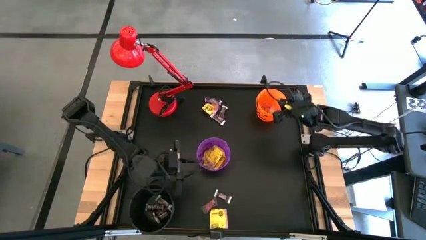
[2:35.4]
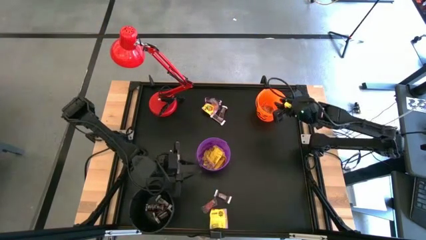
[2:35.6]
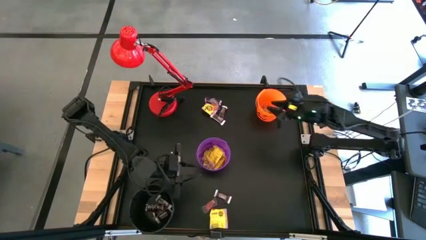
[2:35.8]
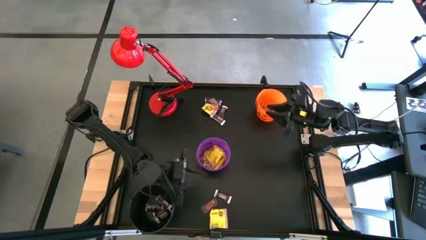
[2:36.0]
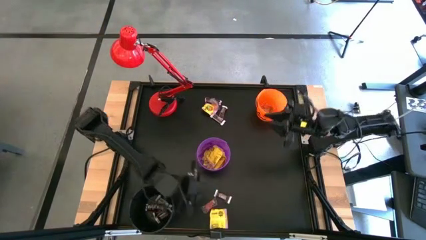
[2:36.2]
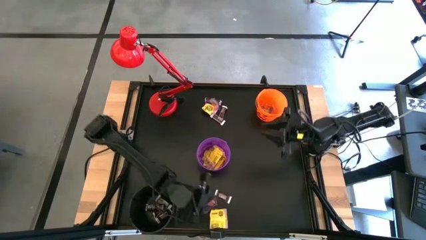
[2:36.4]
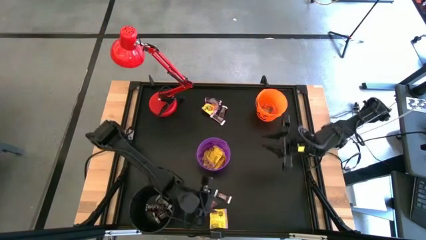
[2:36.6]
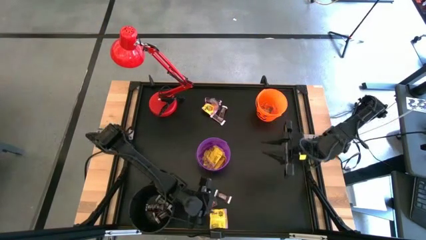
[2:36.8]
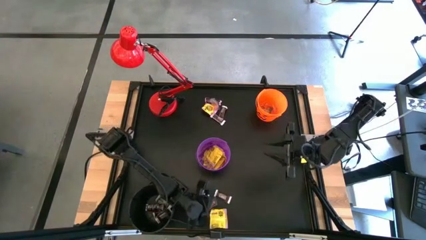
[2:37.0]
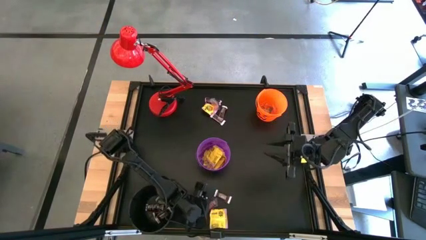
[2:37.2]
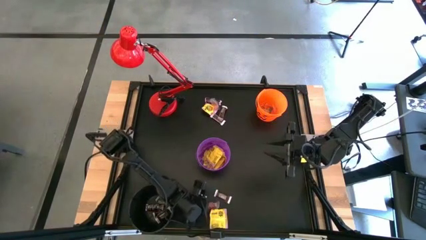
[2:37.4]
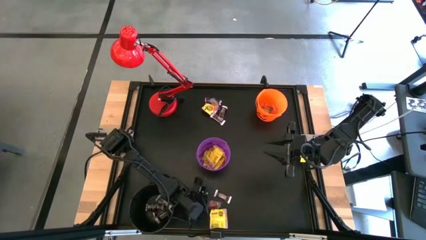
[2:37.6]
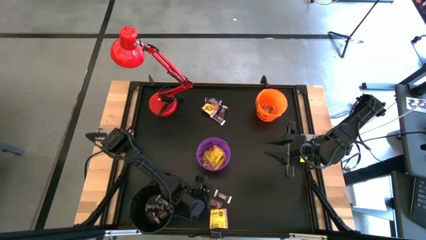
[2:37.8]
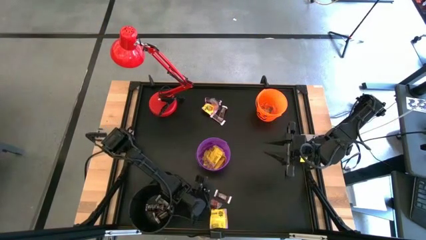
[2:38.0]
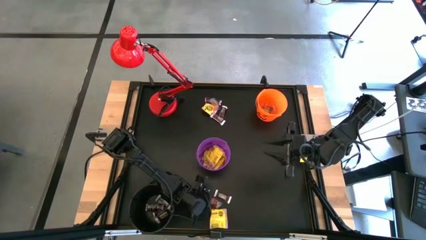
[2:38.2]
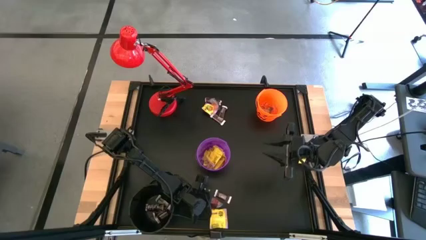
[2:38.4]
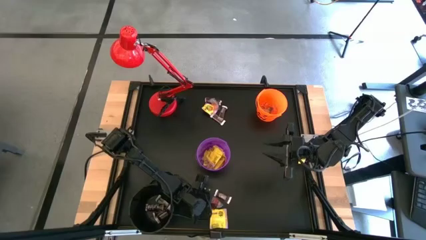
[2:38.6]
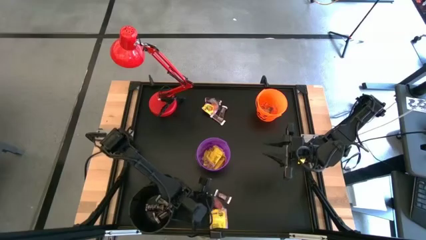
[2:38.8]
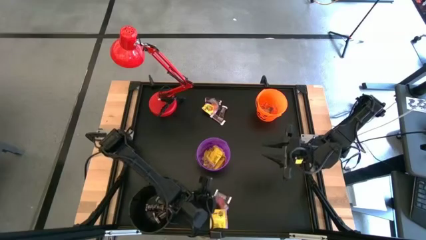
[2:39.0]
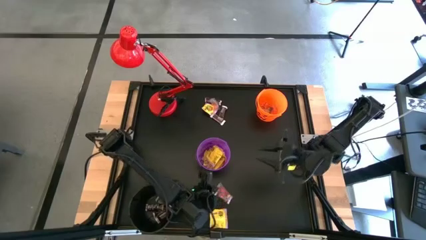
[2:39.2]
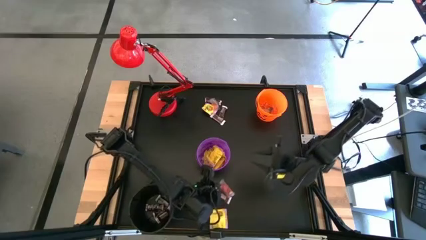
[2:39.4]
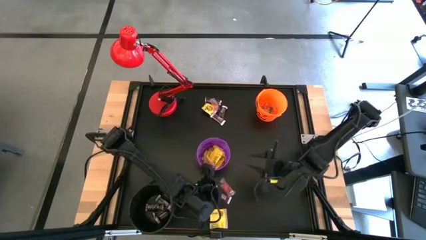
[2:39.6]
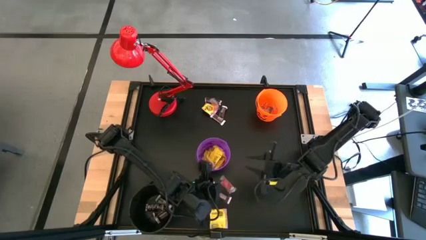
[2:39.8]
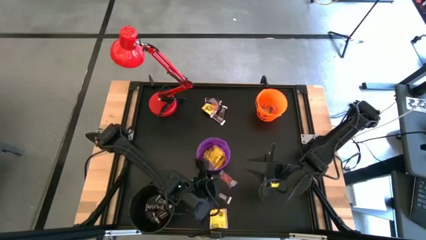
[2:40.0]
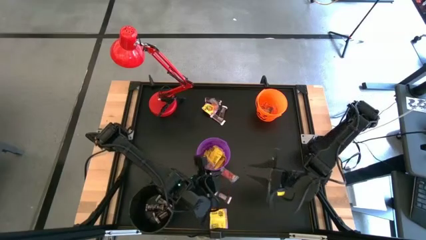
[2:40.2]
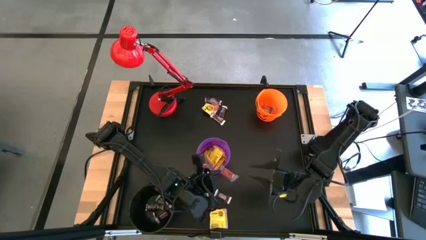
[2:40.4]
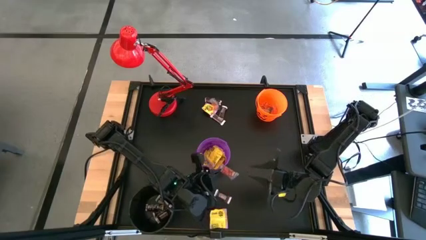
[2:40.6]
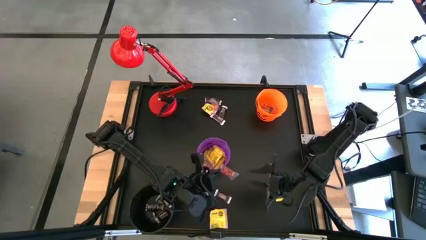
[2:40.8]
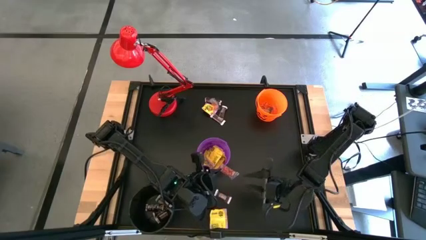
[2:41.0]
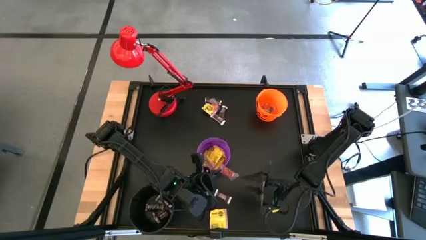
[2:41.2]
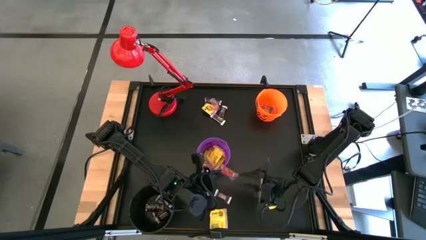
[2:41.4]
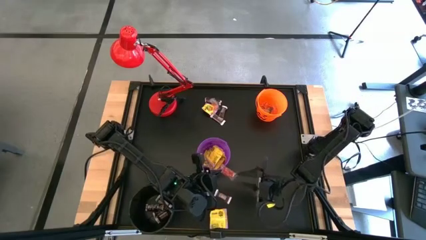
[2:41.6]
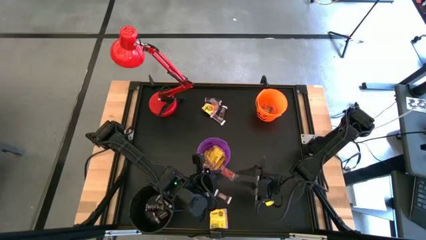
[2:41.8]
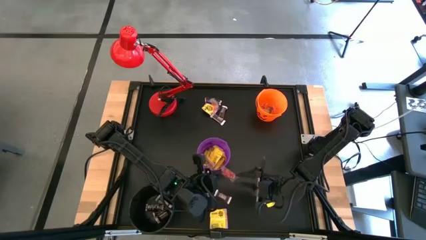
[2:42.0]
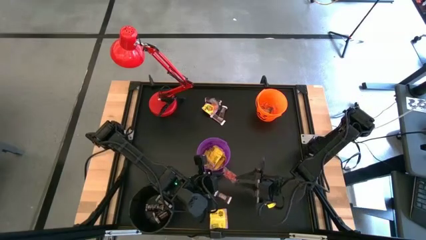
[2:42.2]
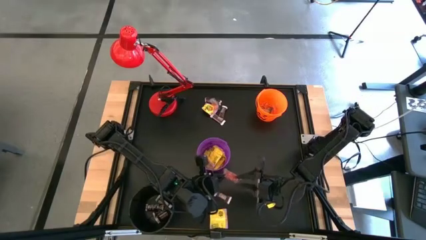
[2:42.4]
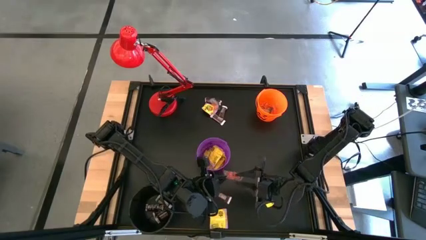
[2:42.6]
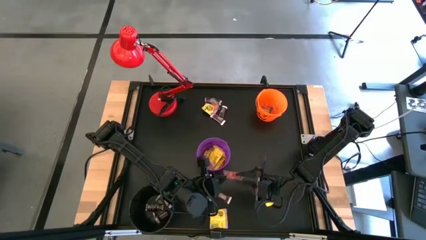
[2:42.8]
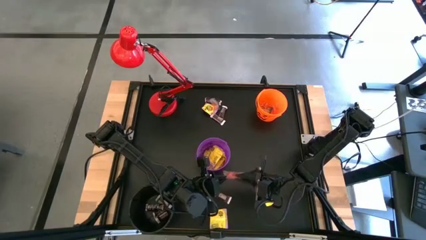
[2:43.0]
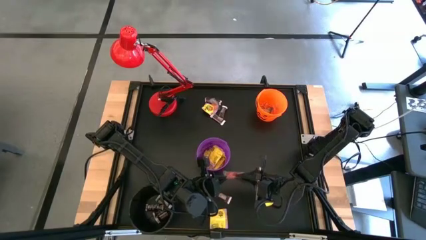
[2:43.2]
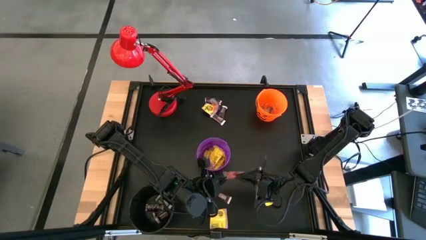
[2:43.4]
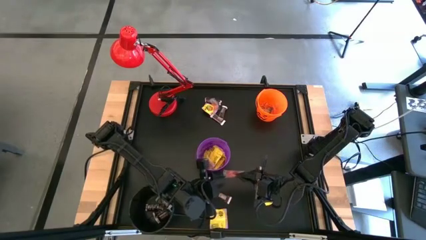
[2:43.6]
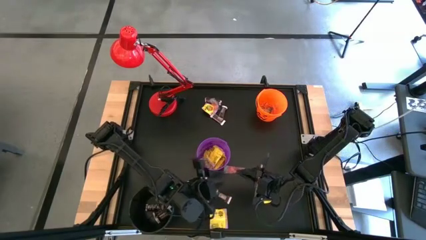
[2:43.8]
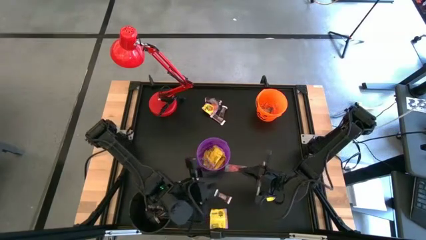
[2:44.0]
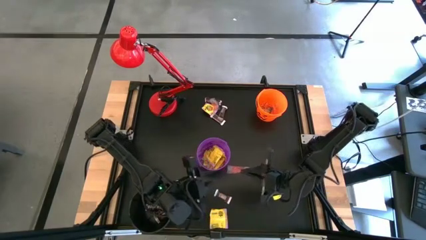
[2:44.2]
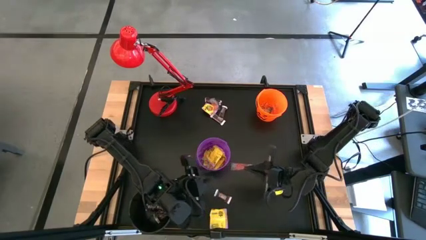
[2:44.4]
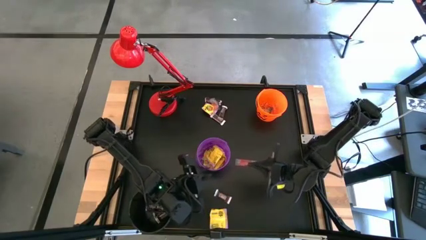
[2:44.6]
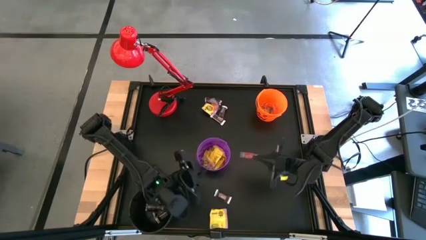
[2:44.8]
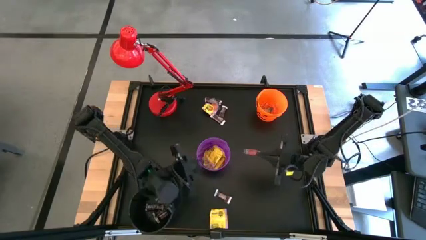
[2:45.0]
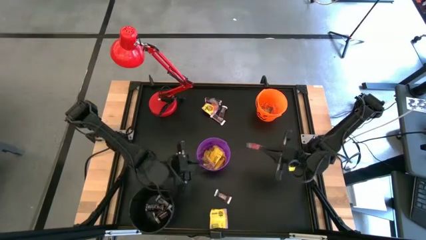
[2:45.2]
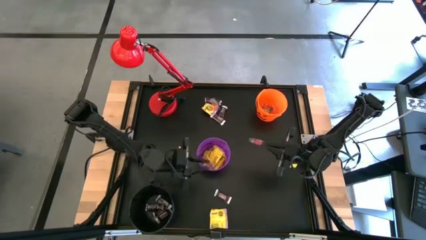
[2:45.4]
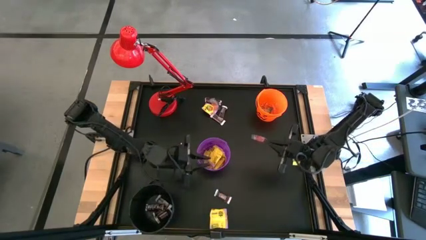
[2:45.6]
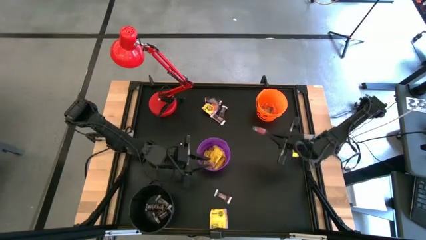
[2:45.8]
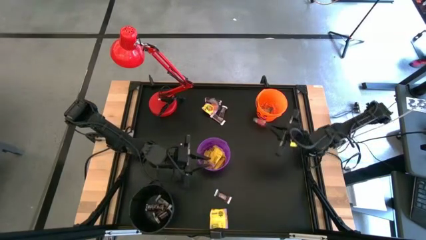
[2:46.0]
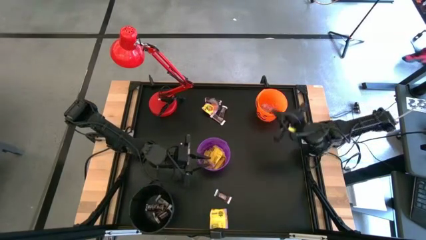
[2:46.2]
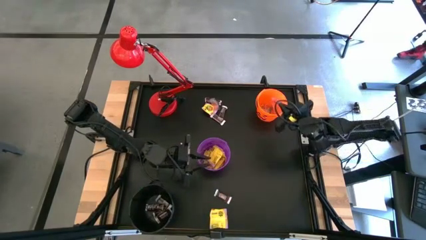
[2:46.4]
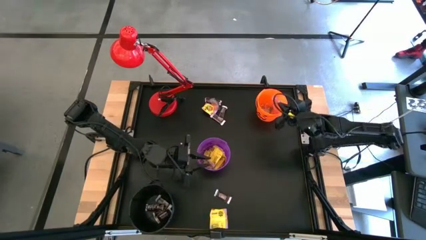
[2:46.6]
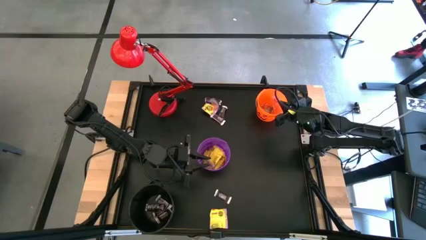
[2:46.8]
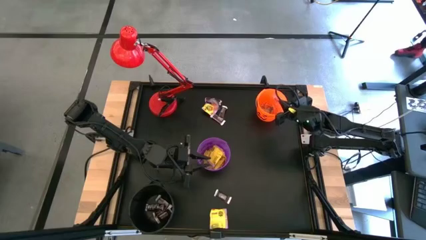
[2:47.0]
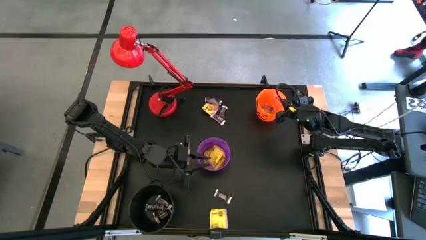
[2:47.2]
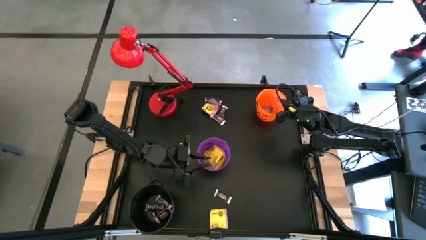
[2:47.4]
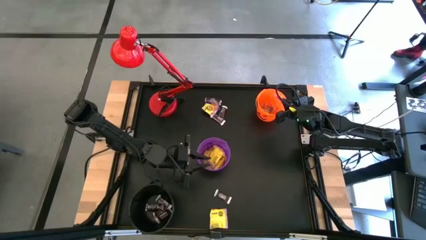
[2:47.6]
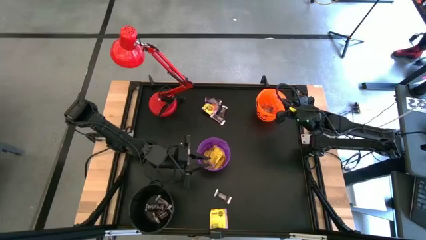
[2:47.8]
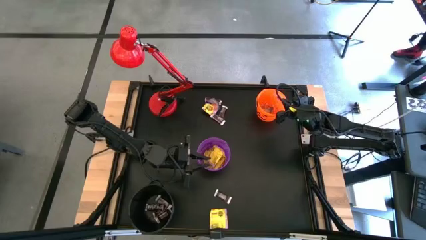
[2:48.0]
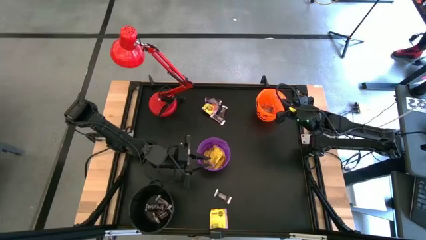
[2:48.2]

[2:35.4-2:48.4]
Task: Sort candy
Put the red gummy into the orange bucket

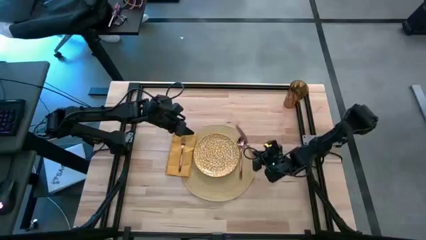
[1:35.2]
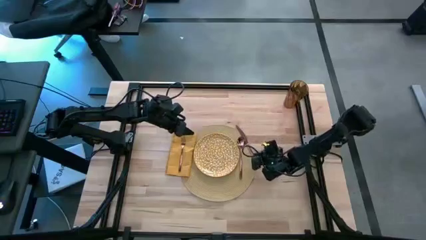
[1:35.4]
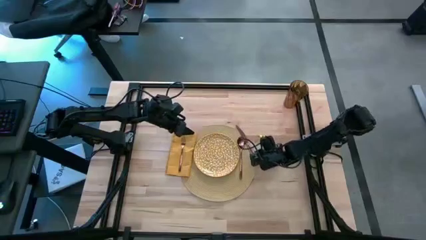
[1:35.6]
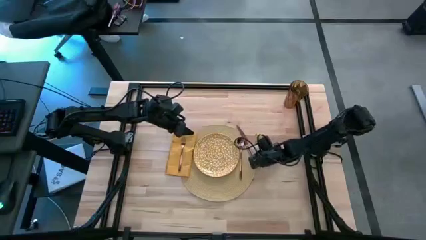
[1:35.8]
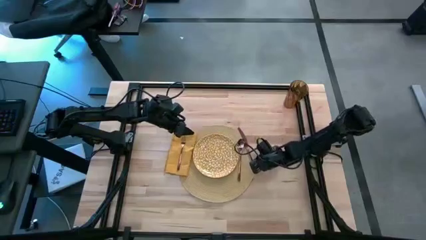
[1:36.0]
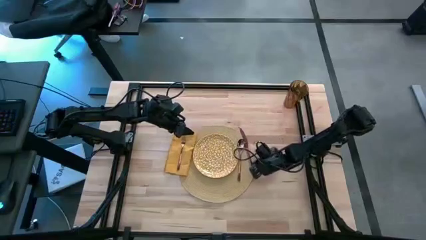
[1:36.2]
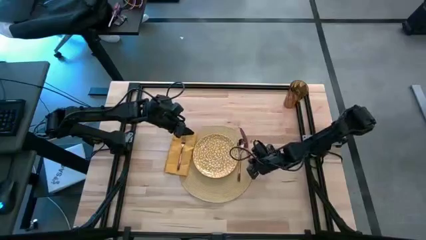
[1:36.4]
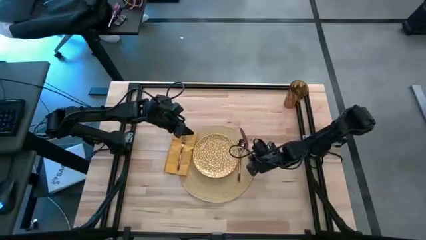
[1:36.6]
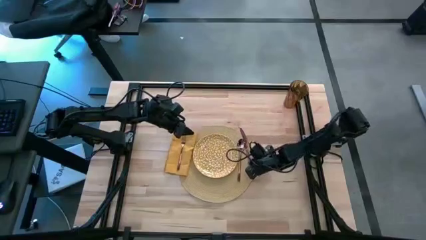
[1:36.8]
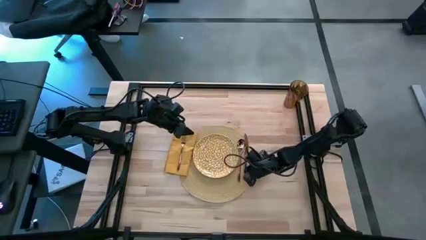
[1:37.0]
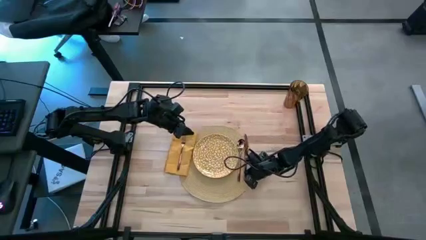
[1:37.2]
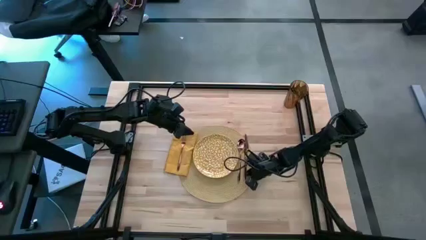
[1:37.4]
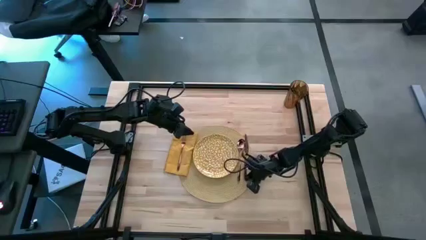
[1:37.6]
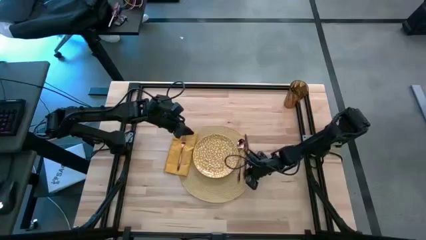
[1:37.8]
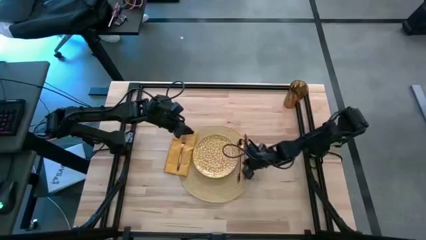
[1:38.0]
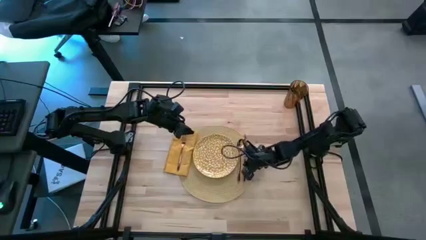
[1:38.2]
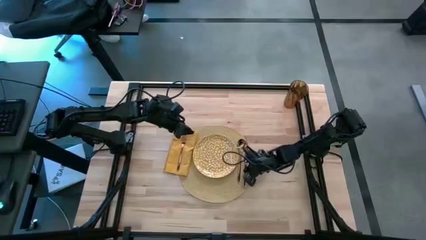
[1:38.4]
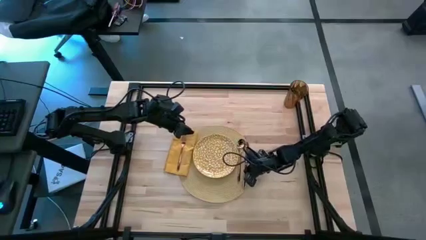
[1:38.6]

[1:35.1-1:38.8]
Task: Set table place
Put the brown knife on the brown placemat
